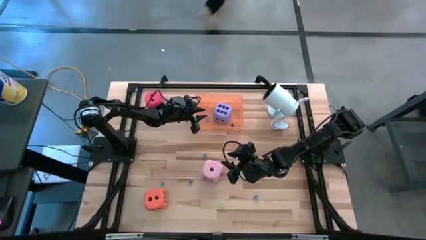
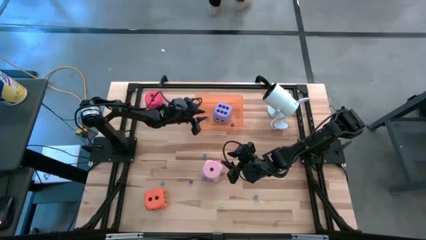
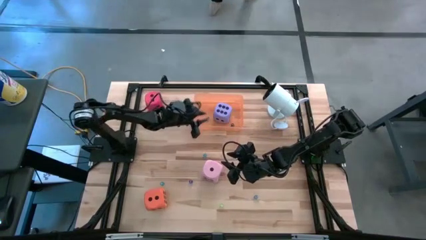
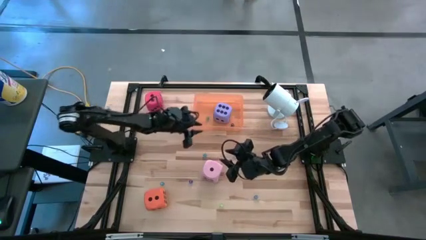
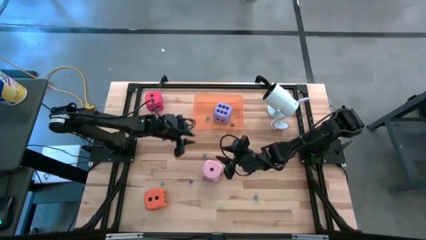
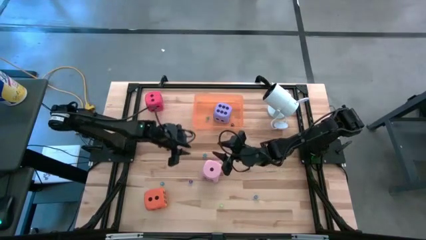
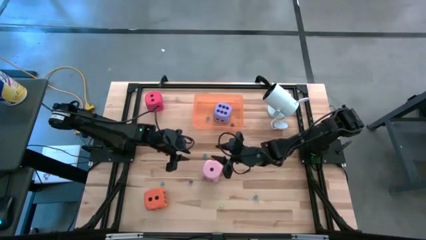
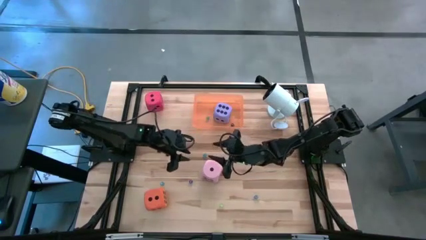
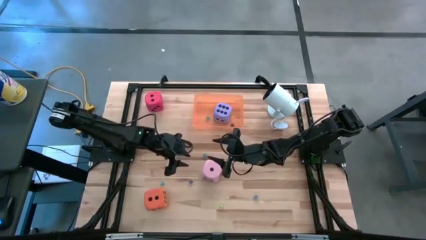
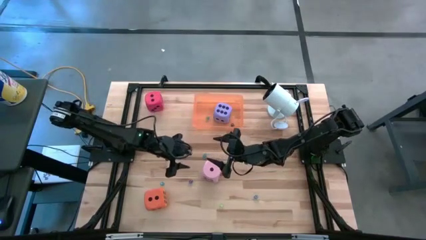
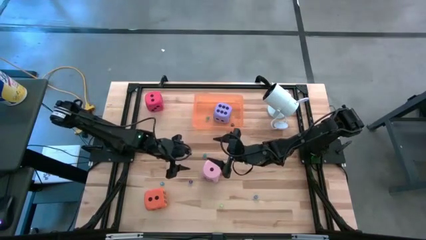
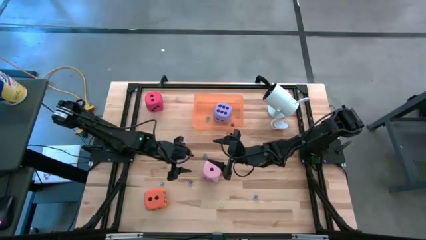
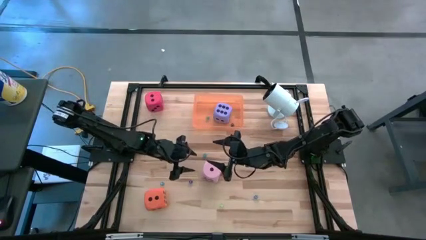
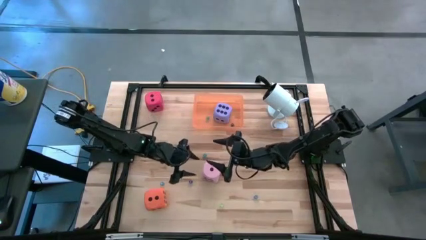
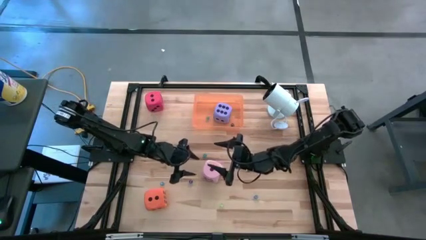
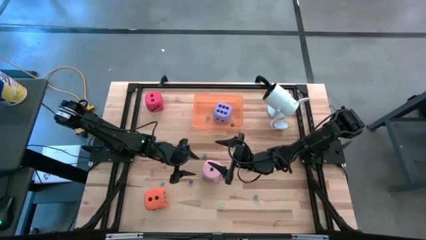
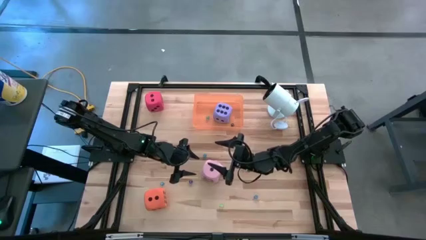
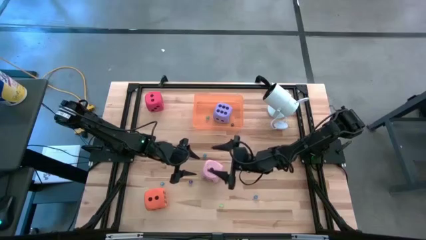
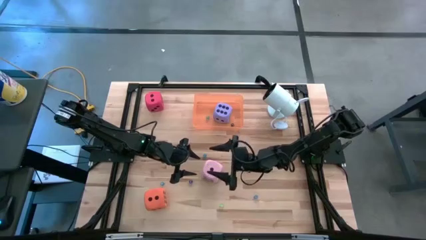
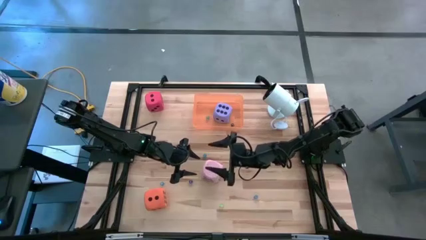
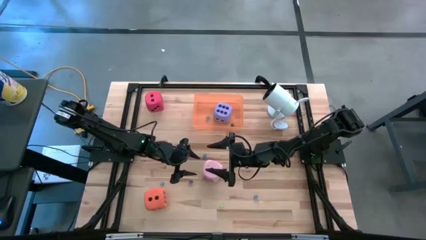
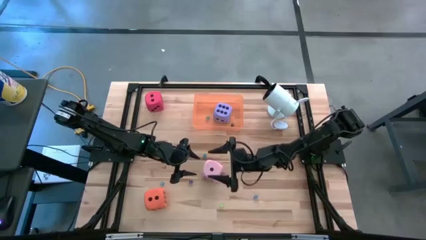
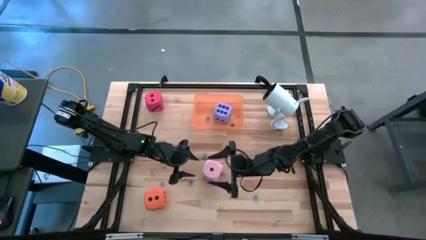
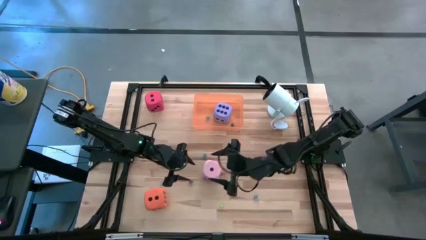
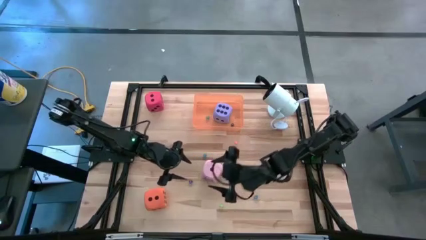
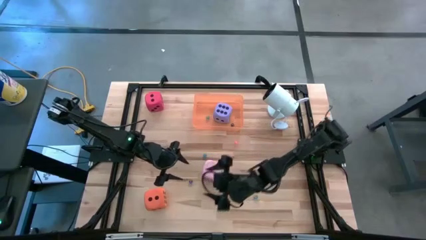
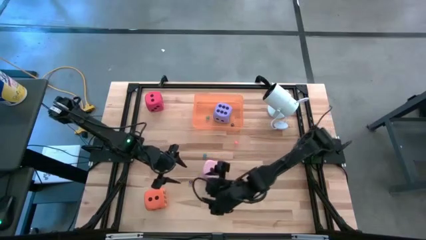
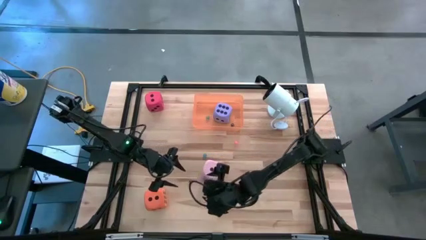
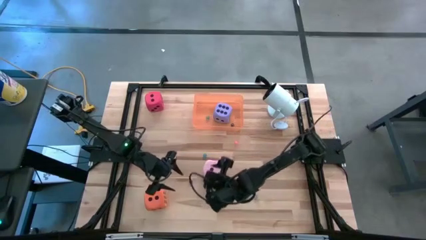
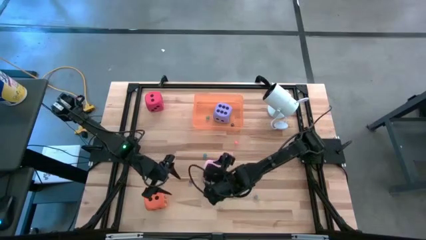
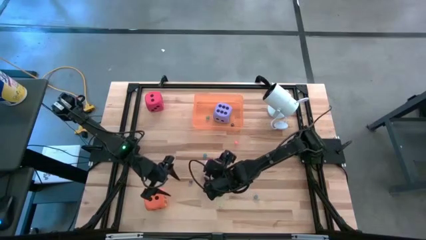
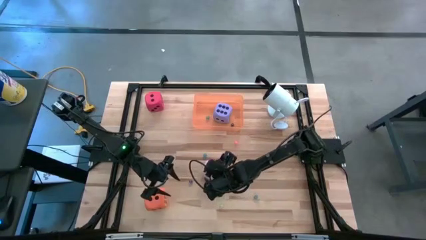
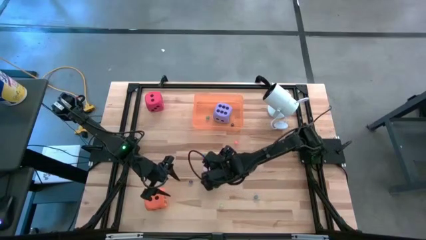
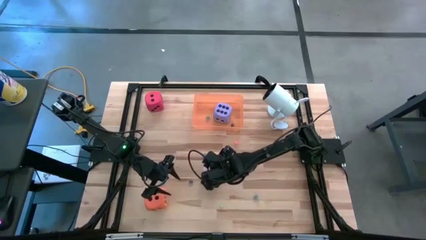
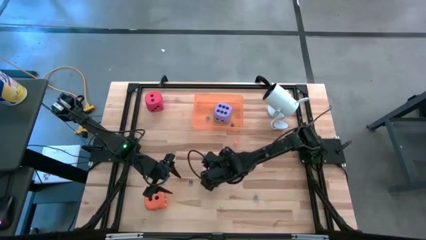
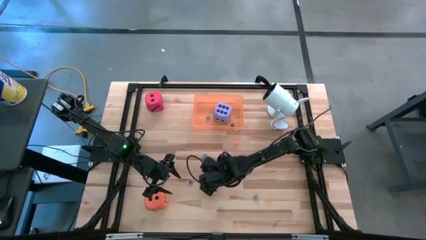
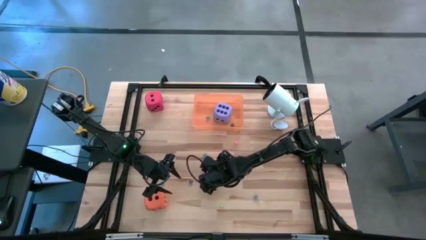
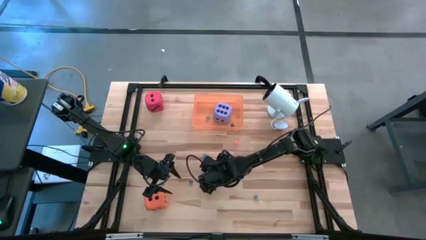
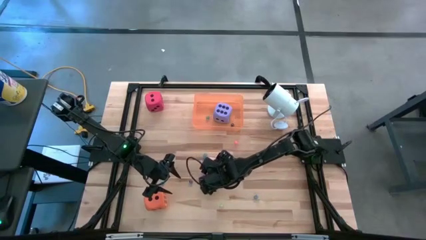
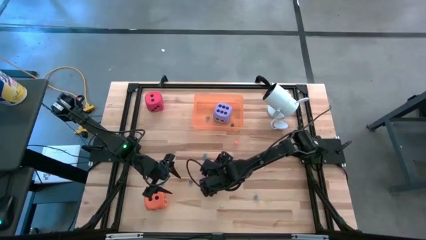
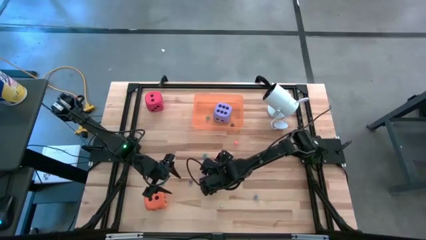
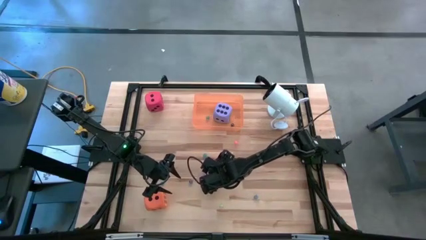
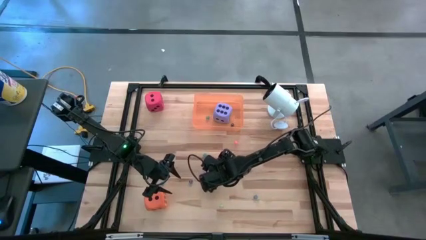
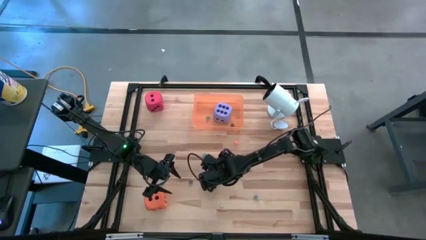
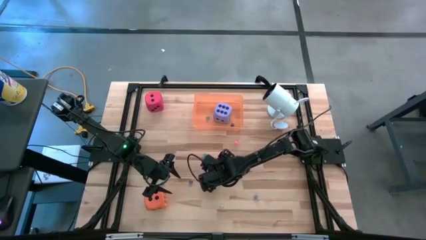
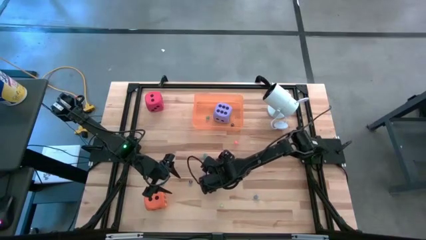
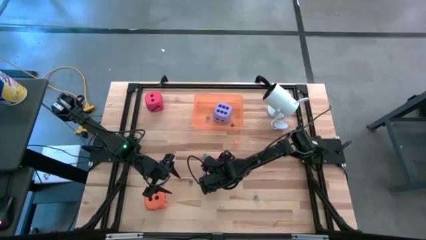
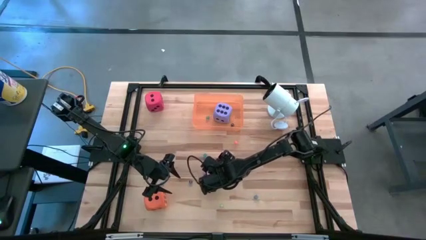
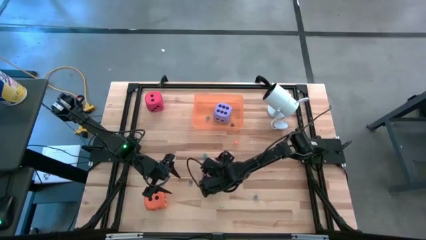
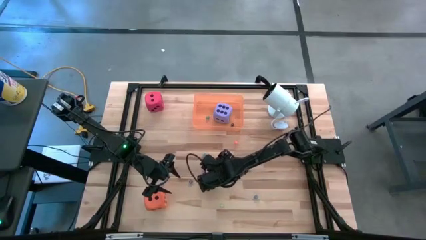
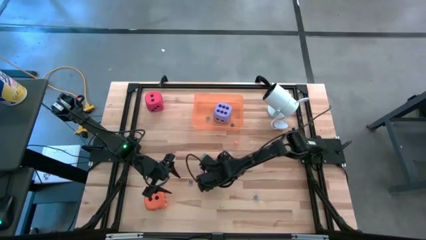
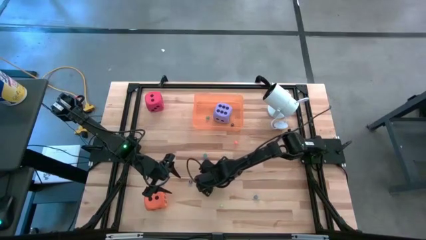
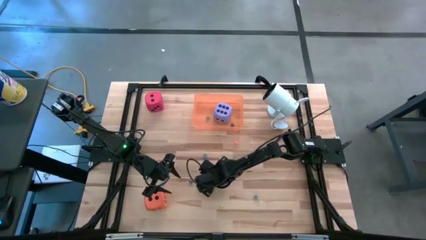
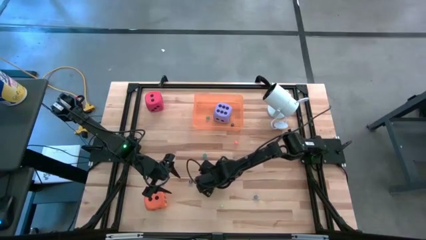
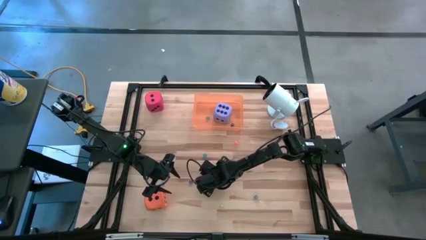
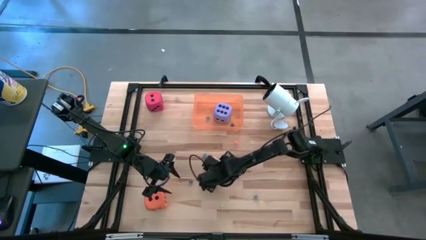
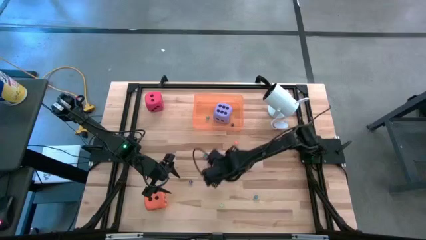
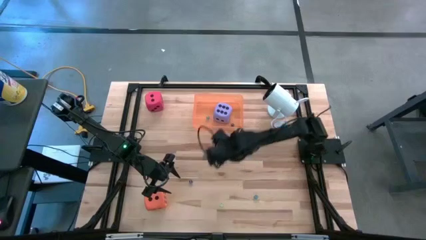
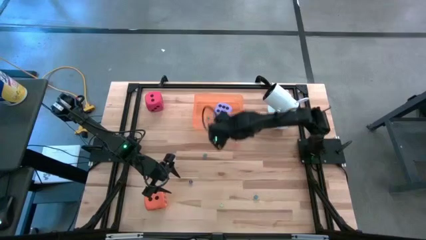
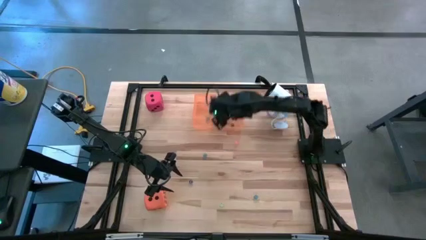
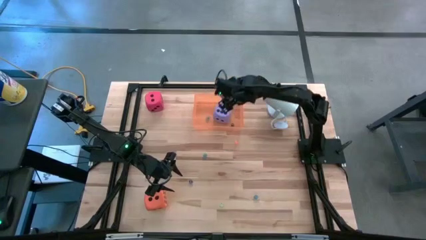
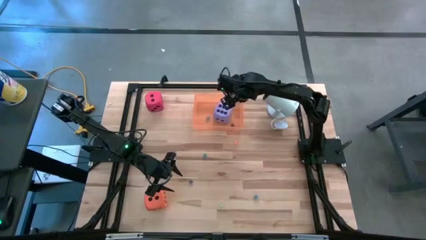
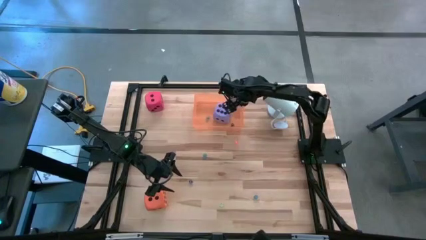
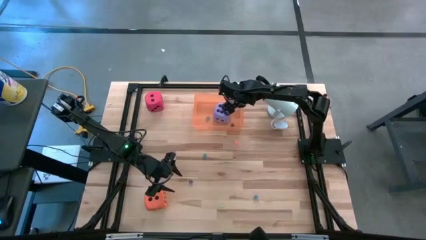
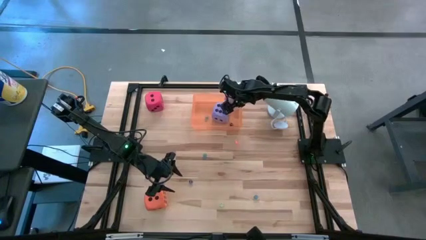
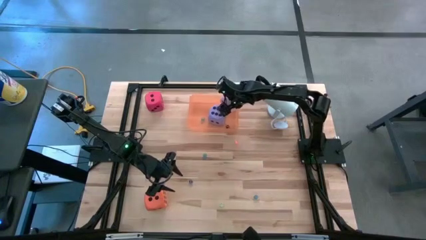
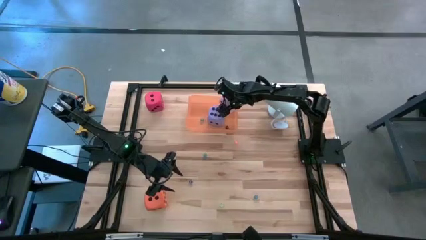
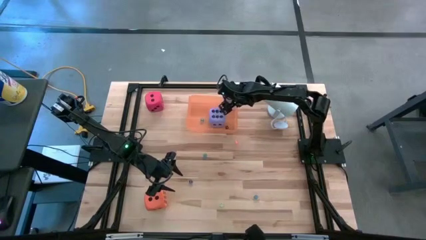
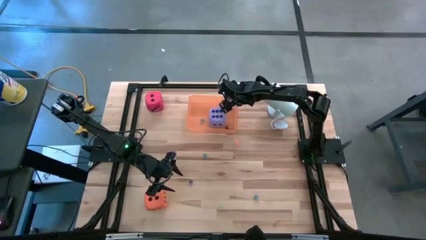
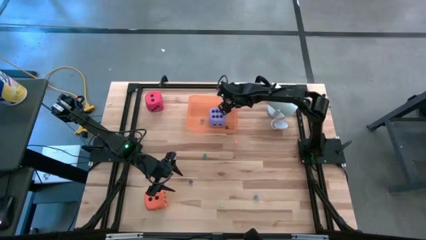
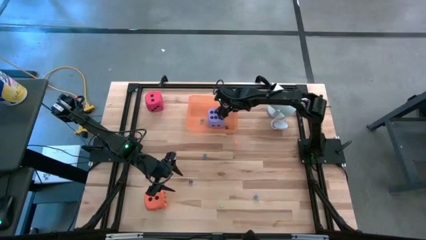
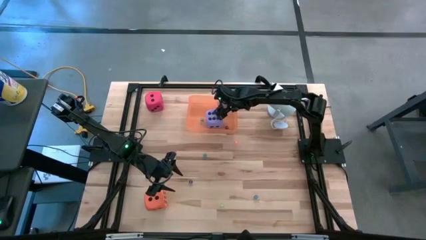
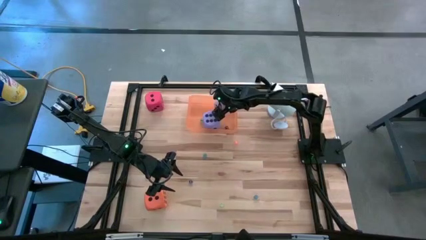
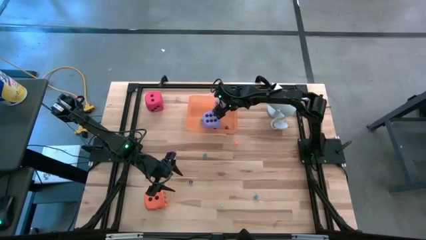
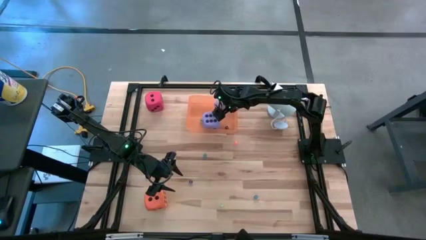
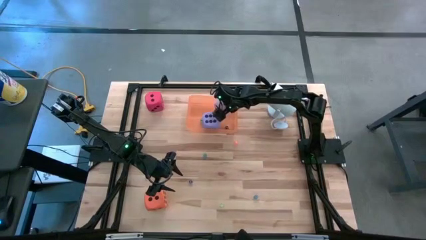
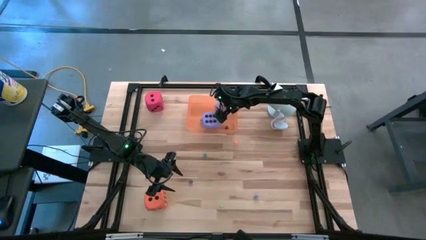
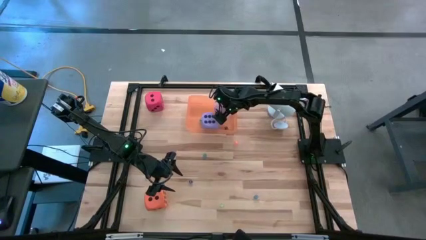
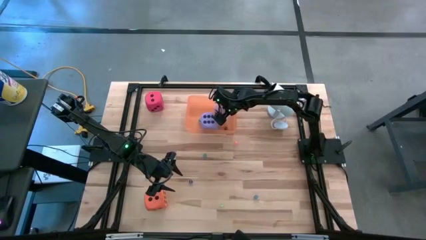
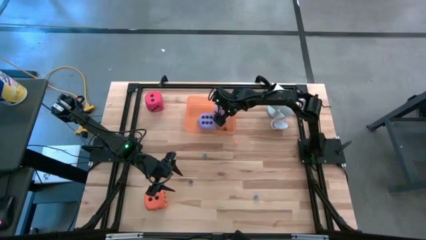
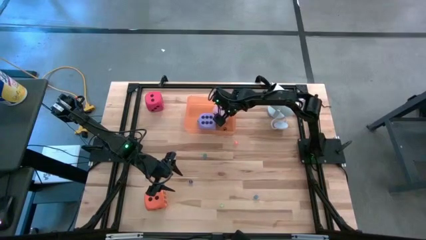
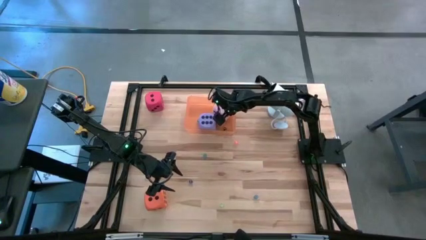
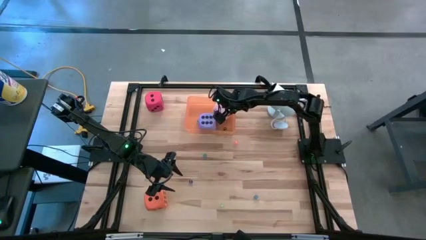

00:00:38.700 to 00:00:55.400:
Task: Pick & Place Dice
Put the large light pink die into the orange bin
